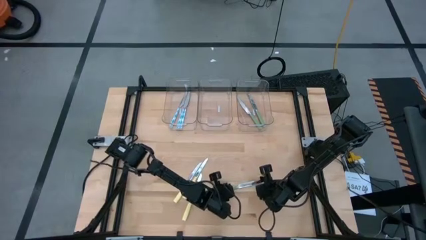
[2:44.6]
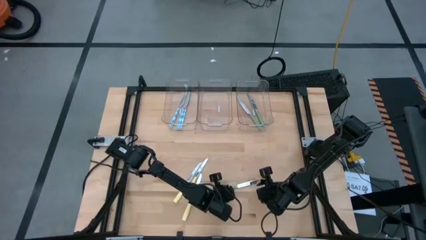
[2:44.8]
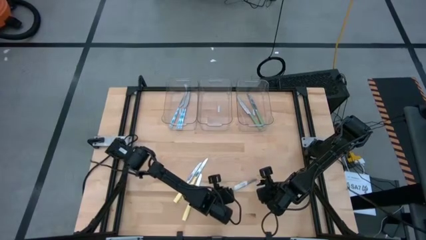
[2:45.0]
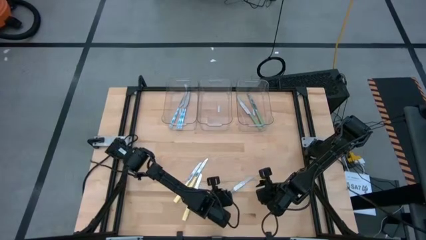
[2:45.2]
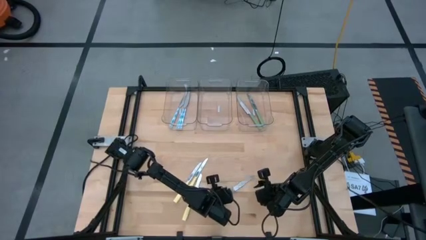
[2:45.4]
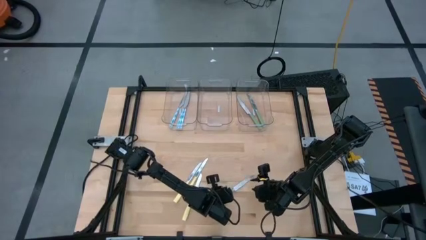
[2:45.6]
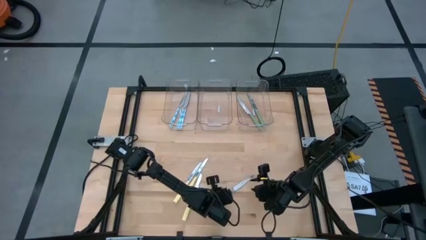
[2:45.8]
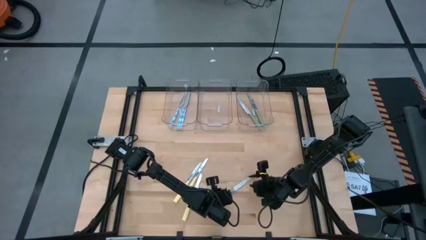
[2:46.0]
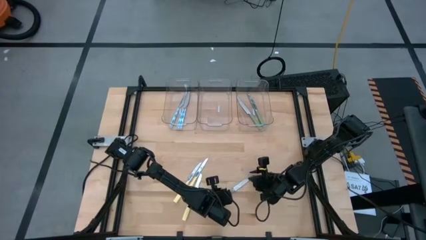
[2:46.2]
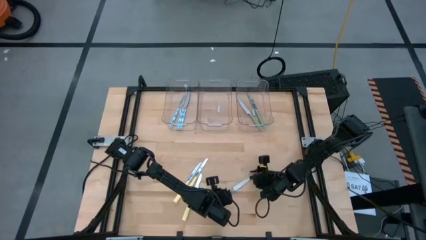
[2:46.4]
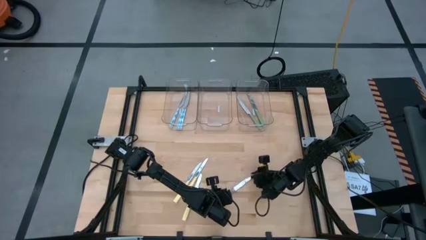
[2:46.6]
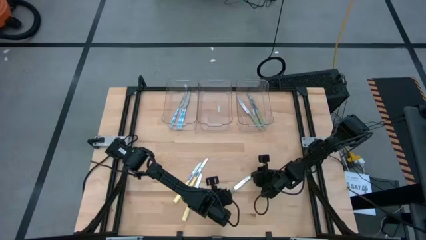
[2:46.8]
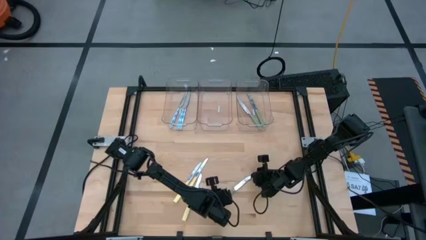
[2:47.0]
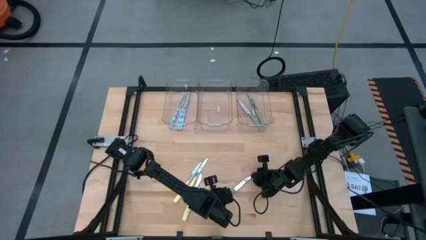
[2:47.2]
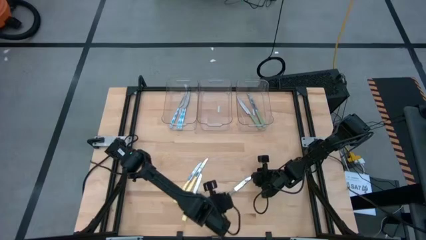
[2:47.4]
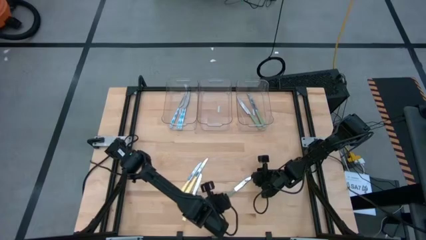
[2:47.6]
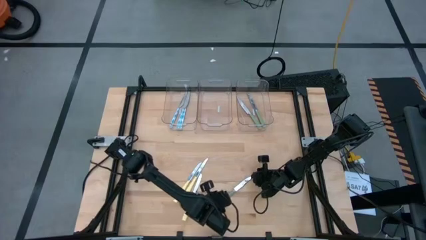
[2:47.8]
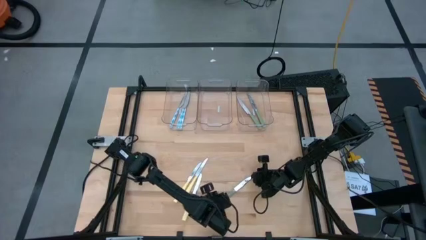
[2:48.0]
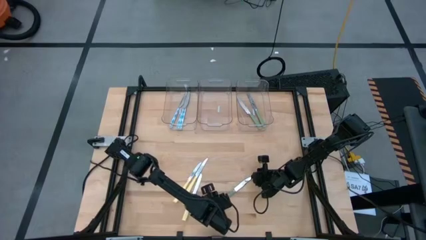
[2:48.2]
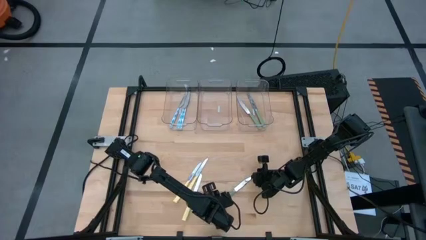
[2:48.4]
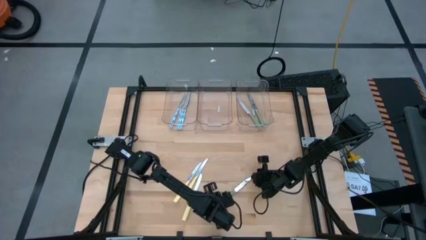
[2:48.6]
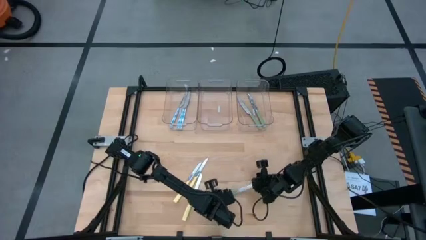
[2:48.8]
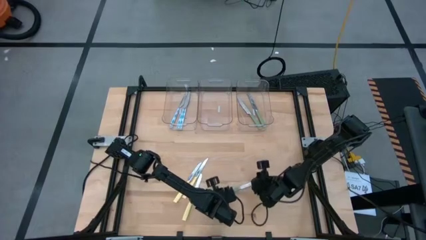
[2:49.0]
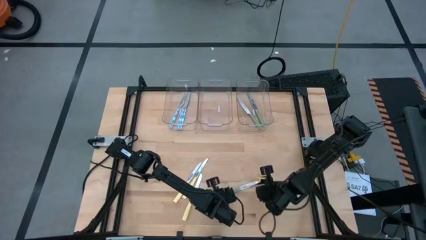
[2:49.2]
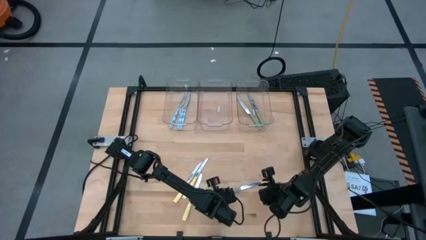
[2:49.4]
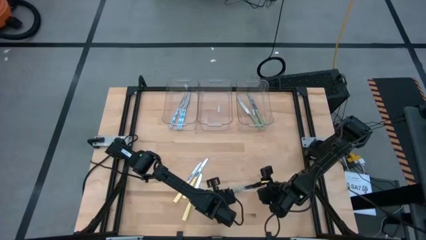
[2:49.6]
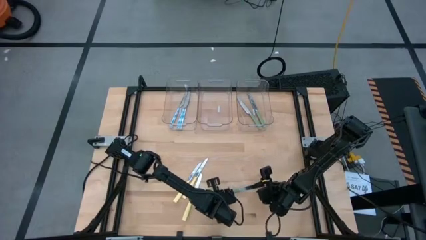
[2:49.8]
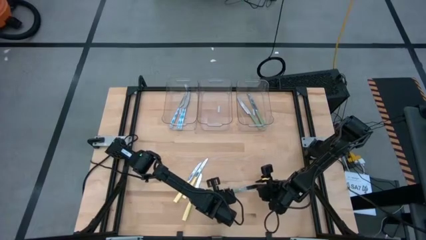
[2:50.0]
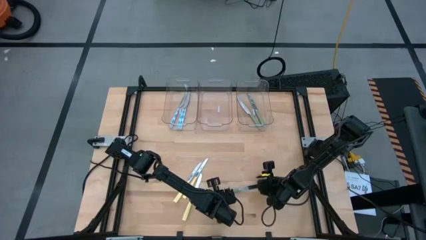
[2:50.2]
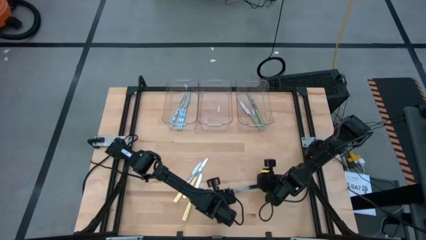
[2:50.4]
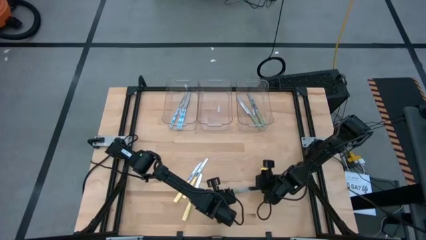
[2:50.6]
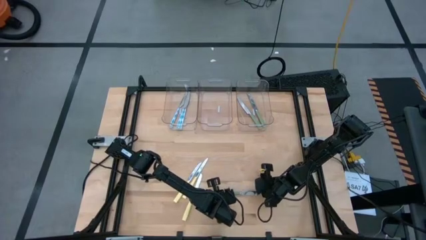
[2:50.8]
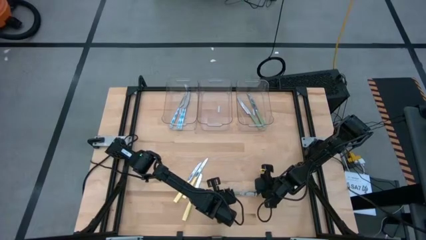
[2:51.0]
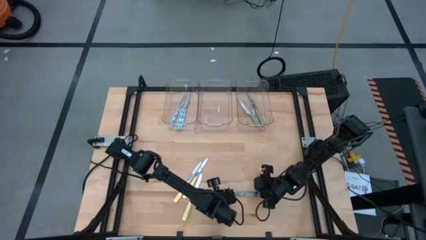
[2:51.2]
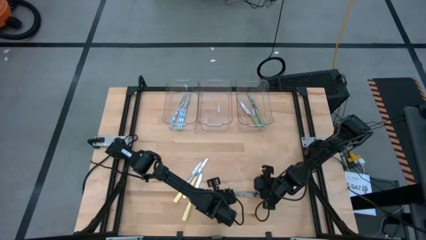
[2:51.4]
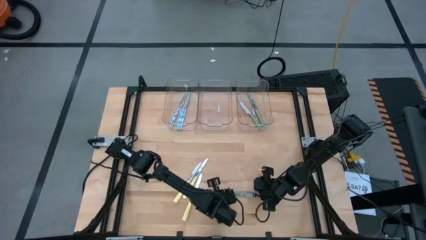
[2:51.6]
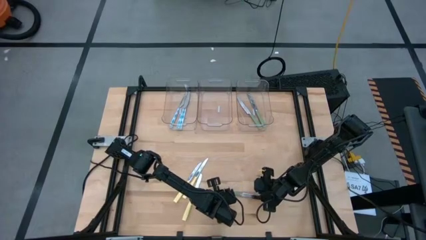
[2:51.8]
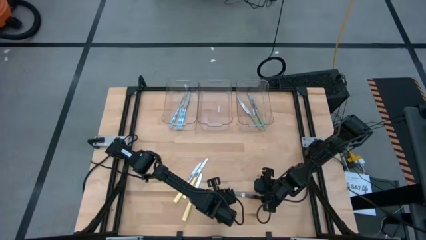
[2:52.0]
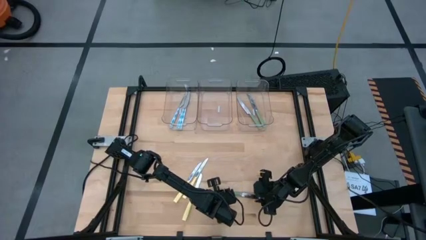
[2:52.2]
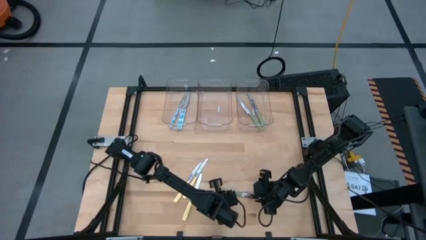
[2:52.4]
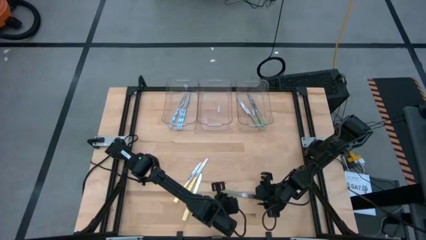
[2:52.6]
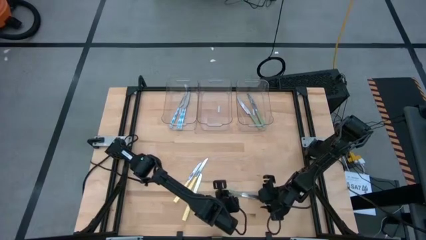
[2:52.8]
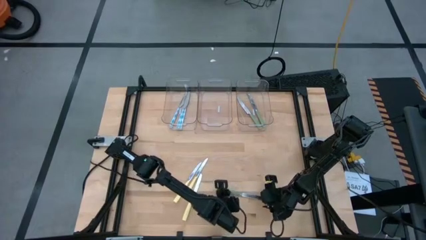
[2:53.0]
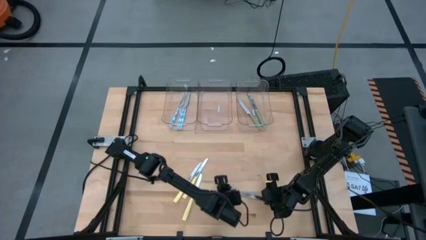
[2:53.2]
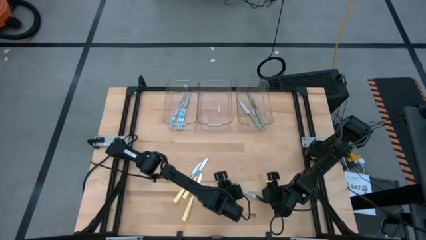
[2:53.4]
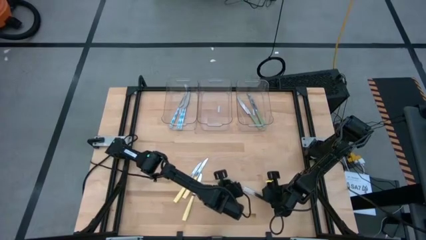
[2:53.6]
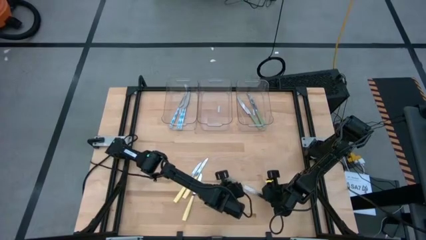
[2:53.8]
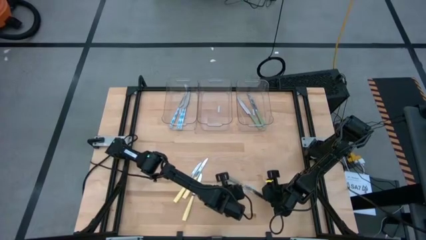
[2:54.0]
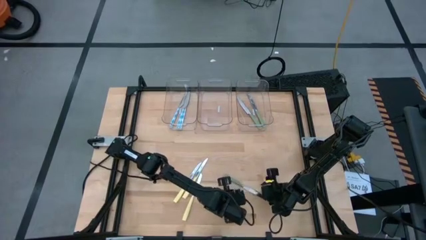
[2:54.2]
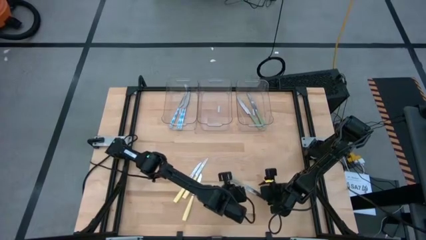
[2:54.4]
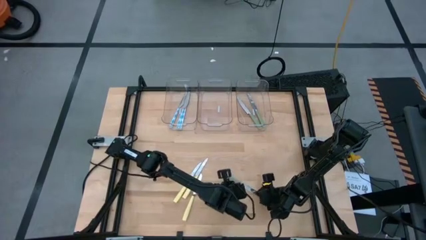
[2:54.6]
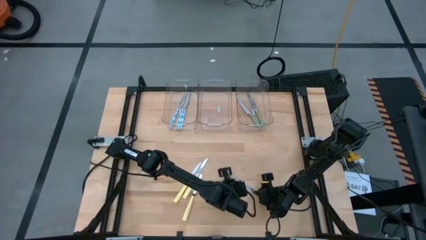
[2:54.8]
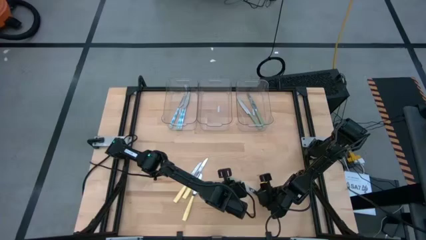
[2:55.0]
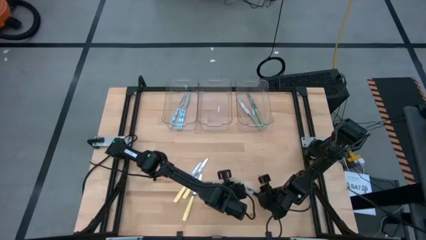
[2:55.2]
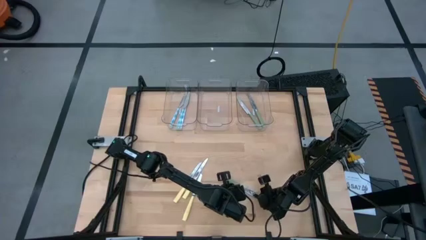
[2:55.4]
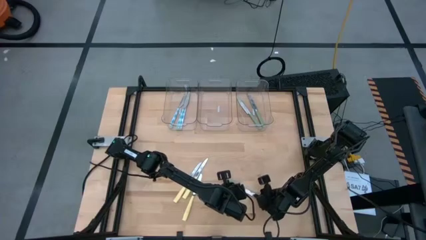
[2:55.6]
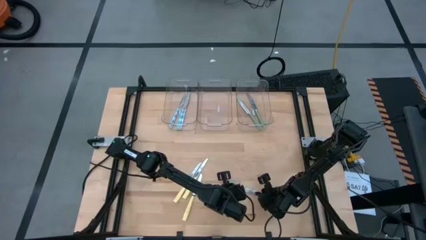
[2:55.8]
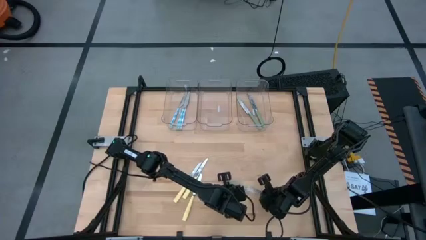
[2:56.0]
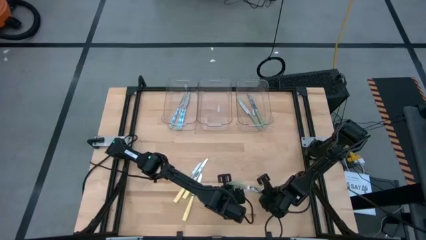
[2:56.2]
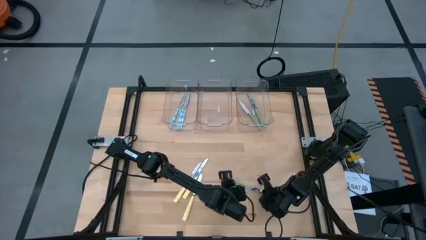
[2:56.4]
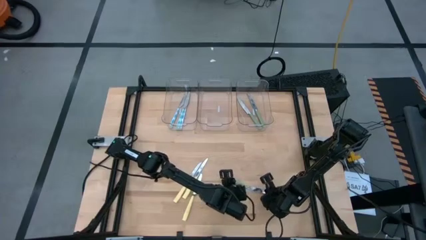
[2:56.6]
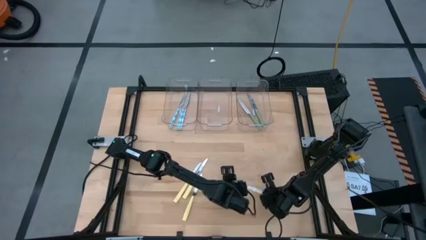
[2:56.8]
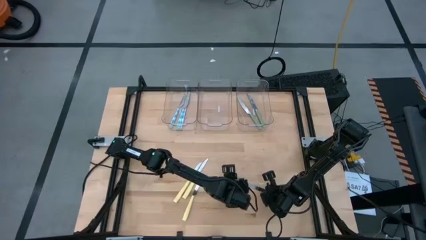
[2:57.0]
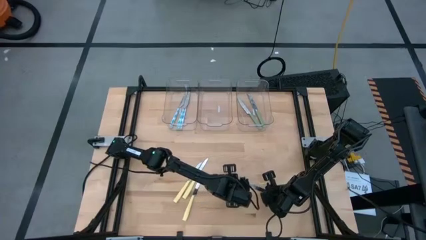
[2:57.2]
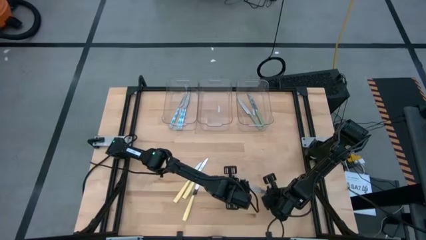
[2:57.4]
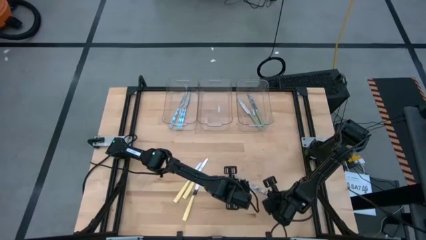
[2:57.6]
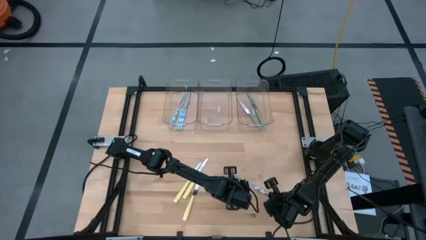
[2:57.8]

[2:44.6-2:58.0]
Task: Sort silverware by color (type)
Put the green knife into the right transparent bin

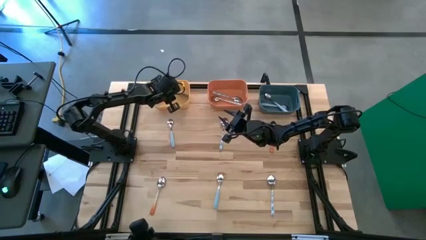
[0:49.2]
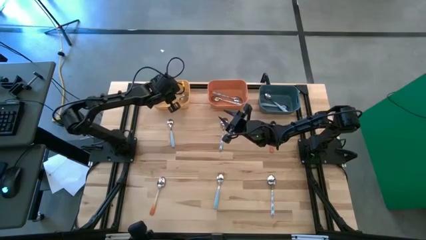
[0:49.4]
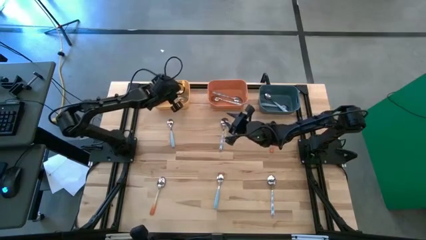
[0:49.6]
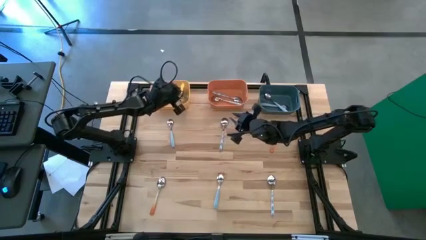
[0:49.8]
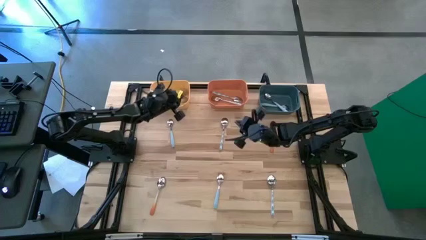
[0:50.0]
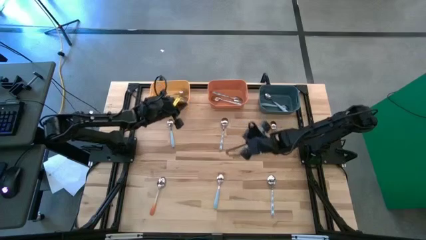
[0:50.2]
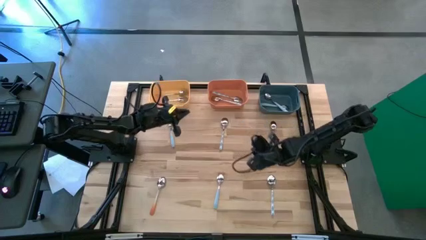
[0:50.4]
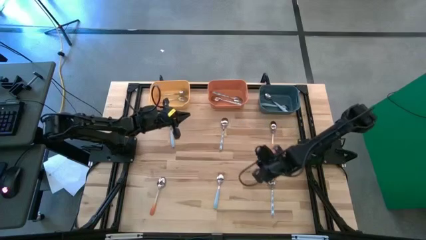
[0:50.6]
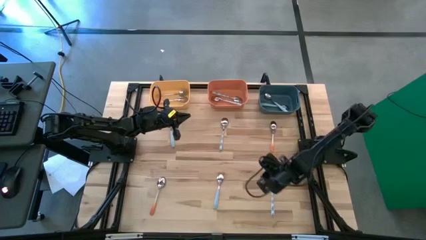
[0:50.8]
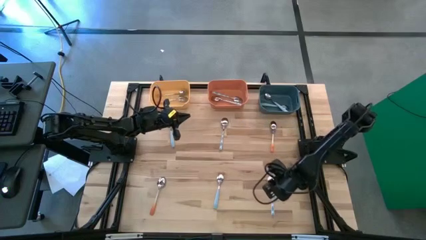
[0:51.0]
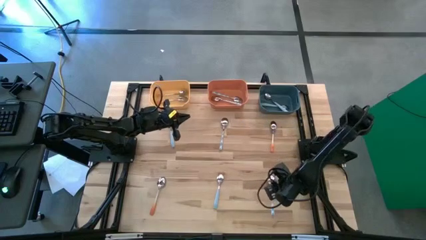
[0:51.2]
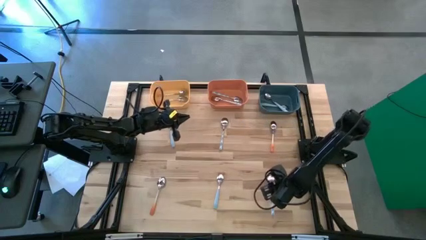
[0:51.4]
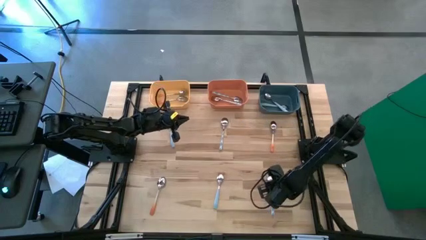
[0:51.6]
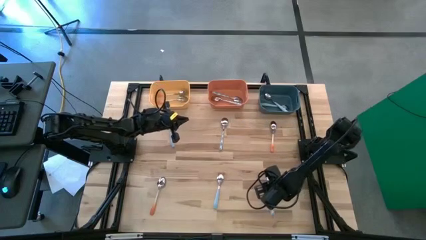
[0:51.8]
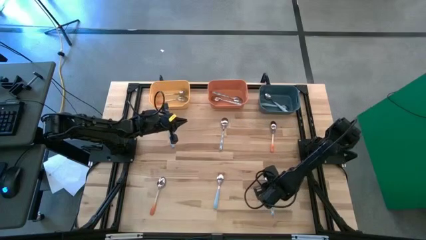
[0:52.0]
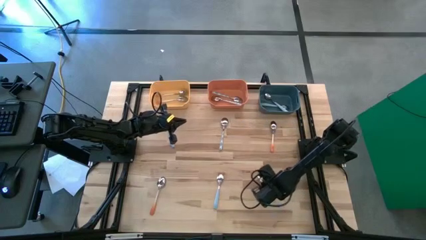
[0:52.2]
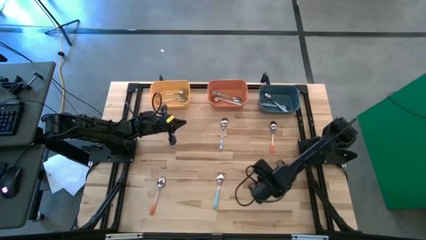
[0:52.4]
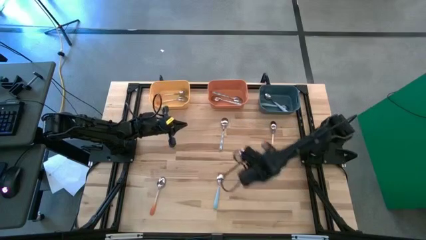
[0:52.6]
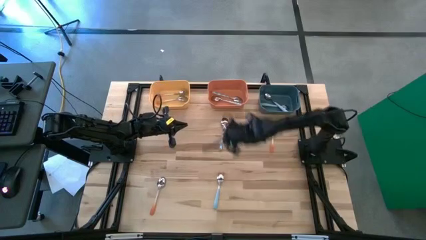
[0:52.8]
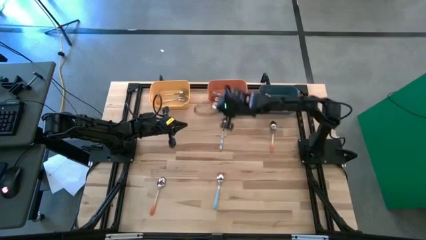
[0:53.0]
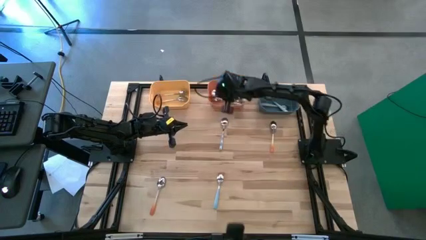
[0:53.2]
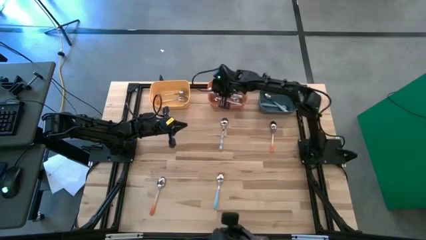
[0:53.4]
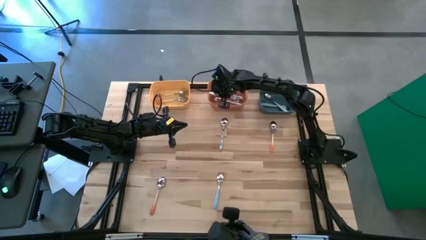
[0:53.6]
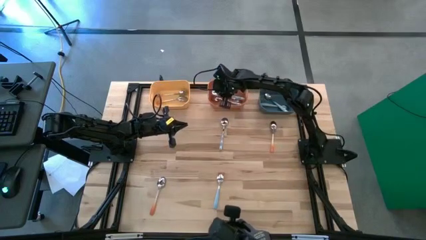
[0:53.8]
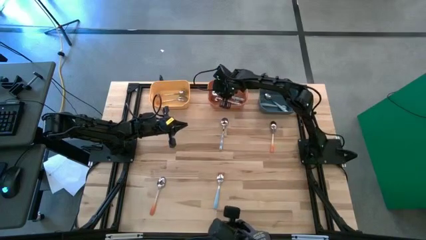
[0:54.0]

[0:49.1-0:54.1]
Task: Sort silverware by color (type)
Put the white spoon into the orange bin
